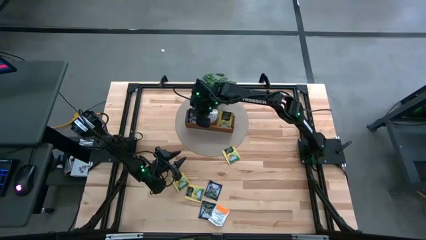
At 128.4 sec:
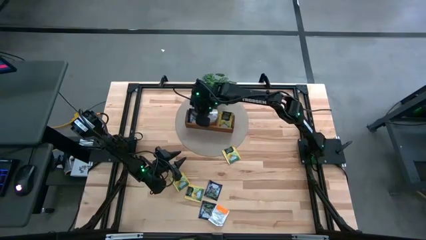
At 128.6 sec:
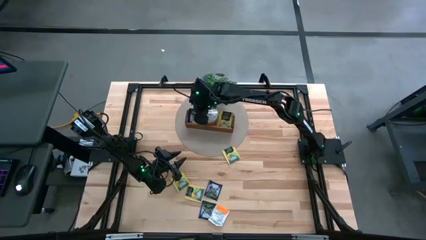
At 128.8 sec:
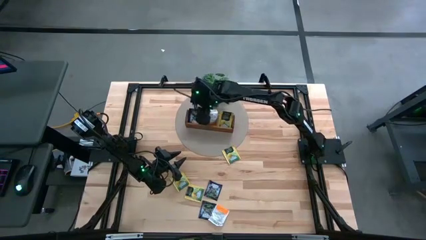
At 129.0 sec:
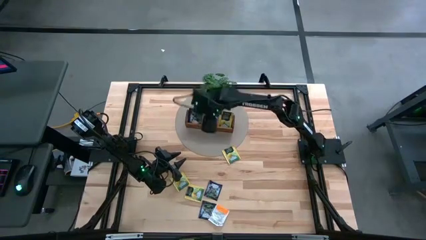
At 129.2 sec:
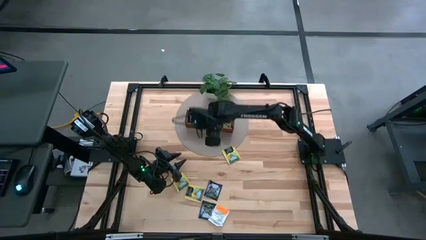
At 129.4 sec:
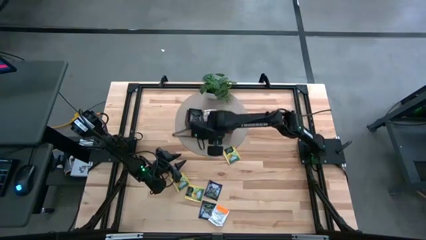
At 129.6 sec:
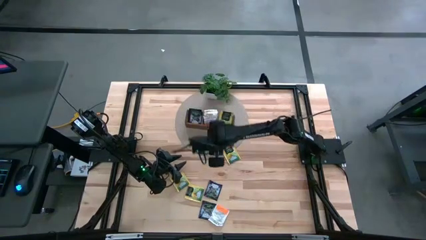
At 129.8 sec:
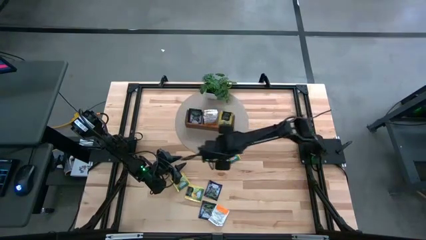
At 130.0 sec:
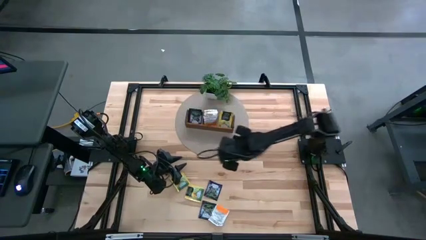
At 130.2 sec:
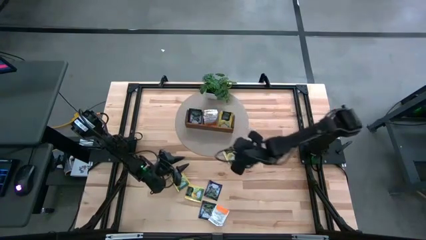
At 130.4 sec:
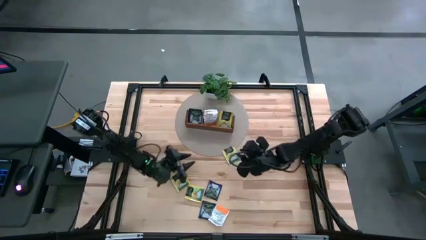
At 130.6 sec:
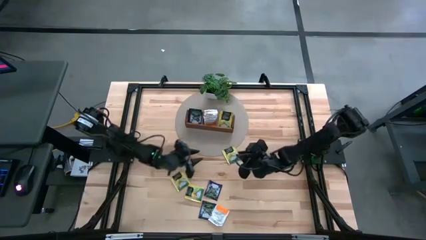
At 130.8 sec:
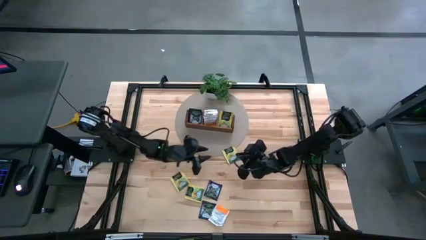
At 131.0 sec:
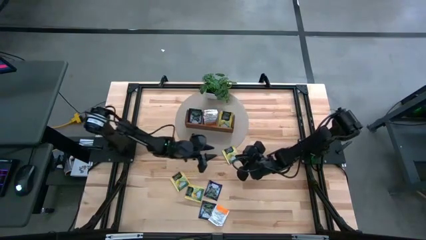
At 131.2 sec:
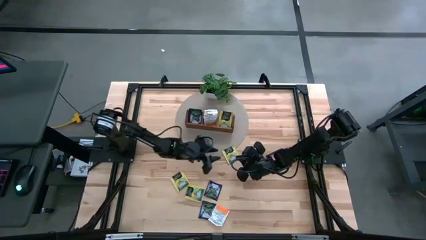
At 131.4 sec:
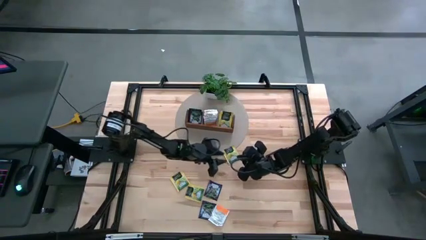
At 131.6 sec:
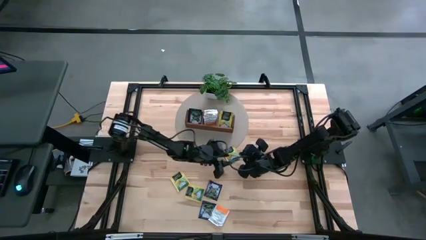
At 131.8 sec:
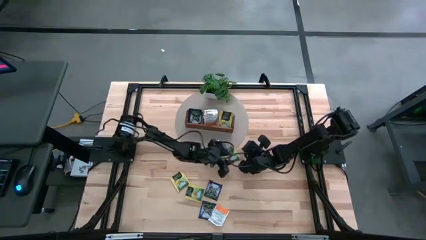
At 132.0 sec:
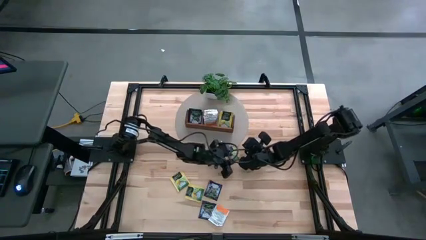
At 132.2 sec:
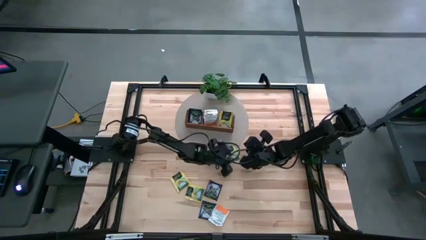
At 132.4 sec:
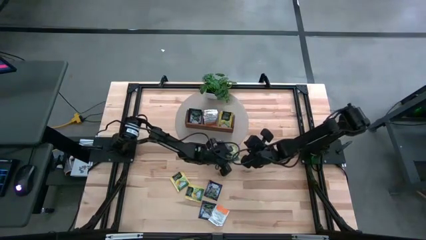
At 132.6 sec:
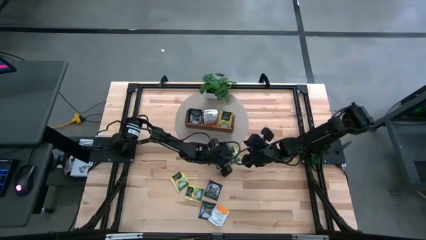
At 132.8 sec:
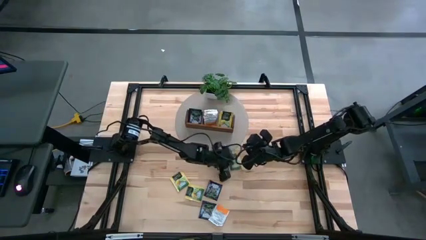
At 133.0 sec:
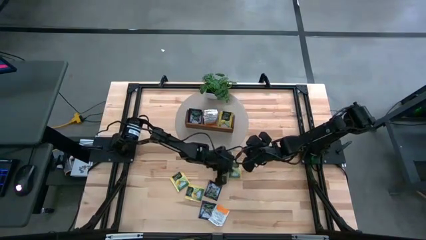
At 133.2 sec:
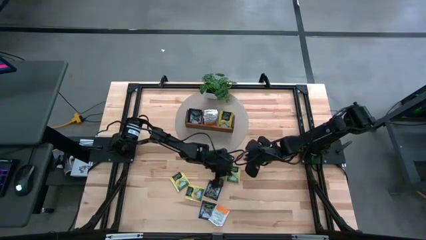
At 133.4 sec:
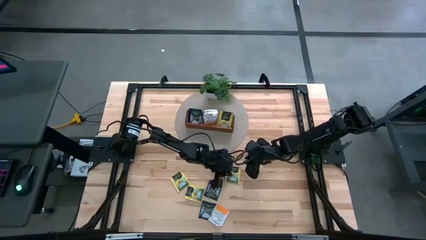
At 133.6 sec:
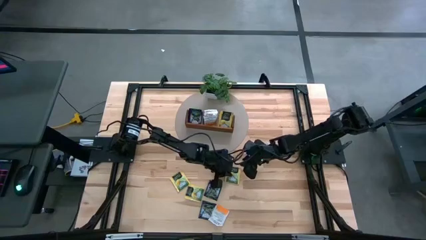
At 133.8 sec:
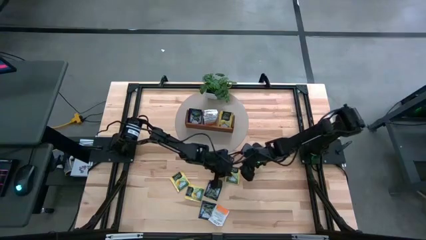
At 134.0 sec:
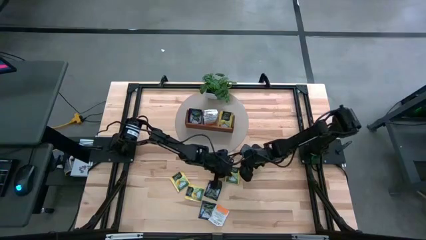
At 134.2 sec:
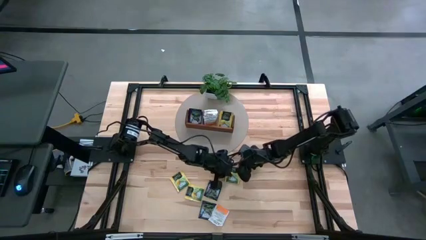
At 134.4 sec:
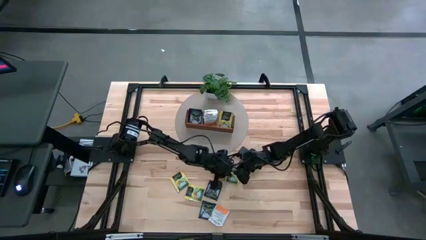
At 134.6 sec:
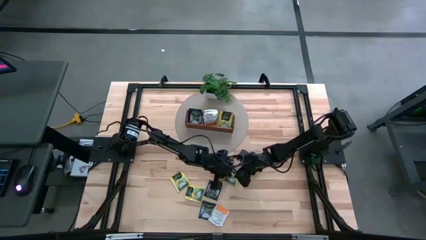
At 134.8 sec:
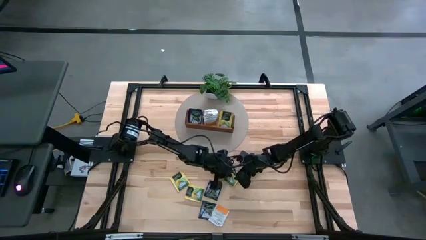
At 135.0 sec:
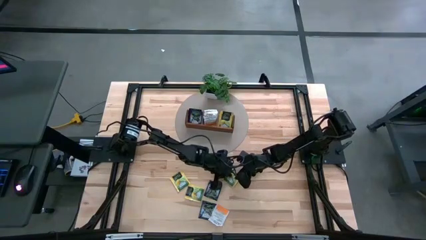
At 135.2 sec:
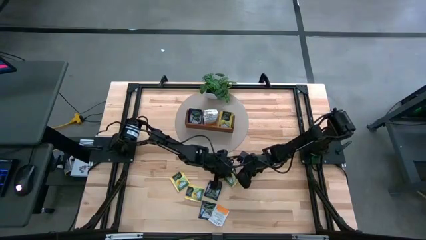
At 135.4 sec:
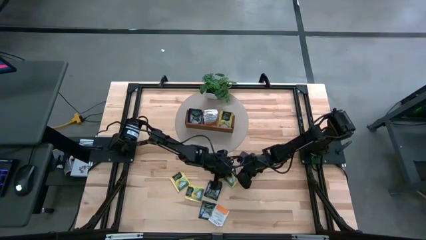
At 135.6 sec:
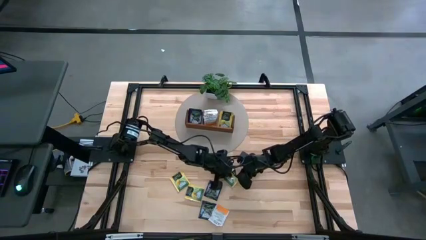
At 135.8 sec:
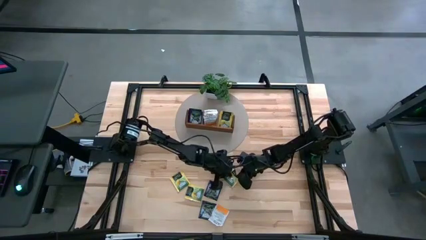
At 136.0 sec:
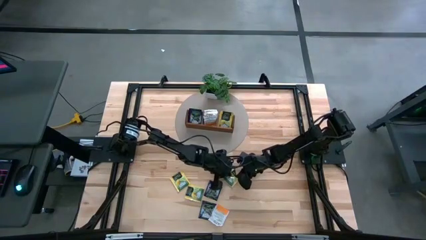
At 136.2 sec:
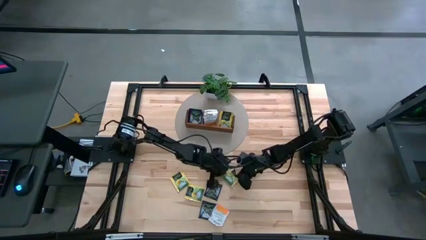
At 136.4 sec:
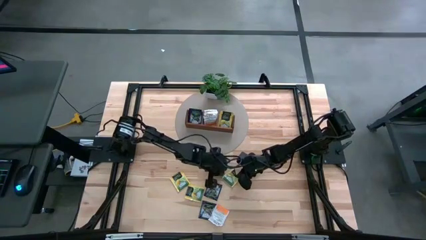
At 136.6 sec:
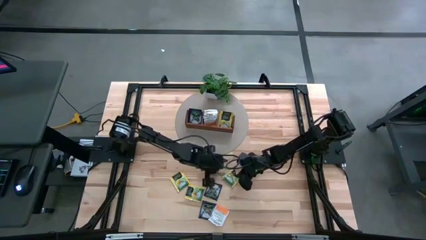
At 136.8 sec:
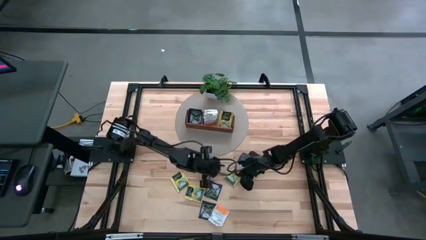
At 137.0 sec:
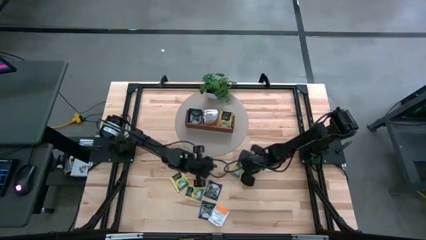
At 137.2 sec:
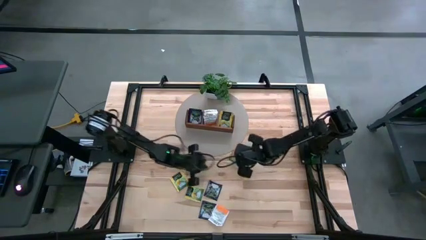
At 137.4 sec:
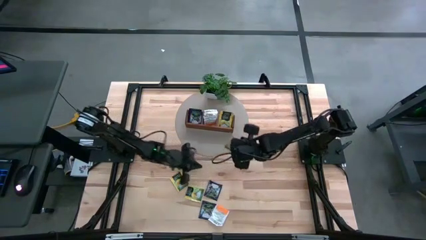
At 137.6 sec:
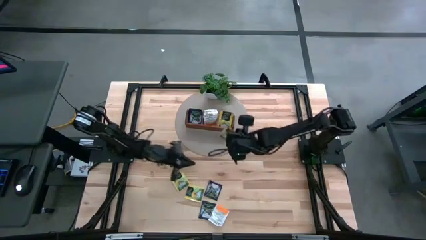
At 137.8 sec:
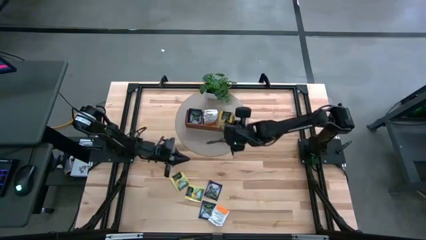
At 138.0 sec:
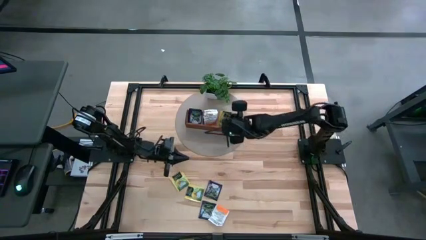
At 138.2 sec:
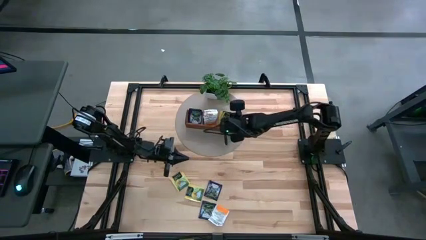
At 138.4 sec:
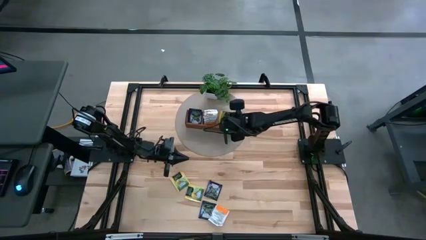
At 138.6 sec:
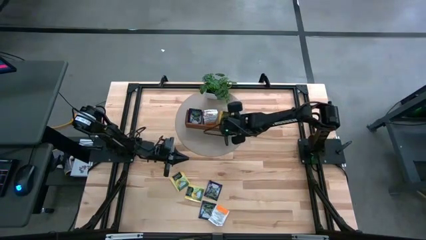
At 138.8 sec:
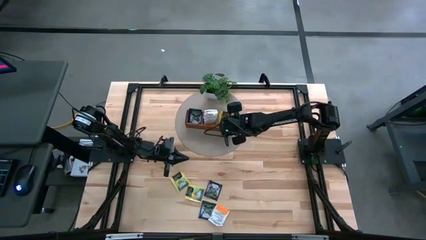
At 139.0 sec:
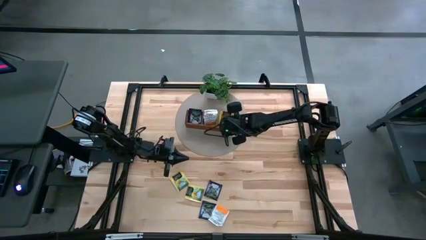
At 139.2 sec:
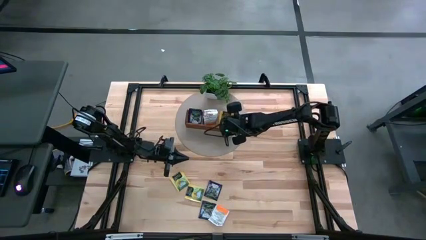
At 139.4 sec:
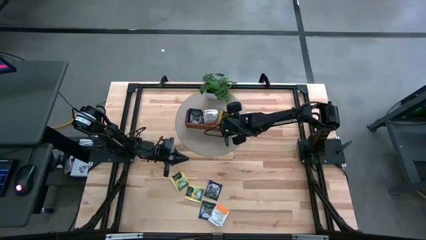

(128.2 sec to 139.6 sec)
Task: Pick & Place Tea
Put the right yellow tea bag into the right section of the wooden organizer

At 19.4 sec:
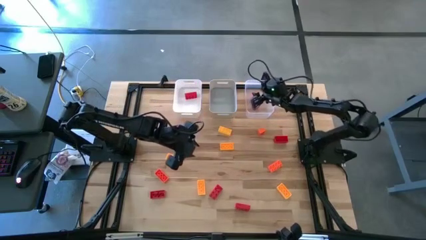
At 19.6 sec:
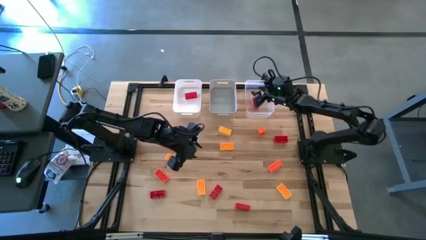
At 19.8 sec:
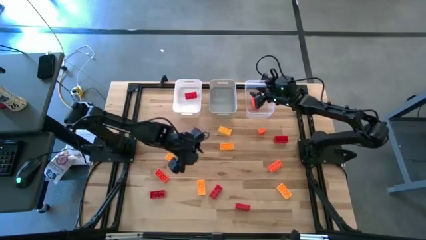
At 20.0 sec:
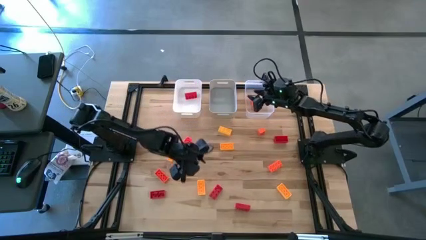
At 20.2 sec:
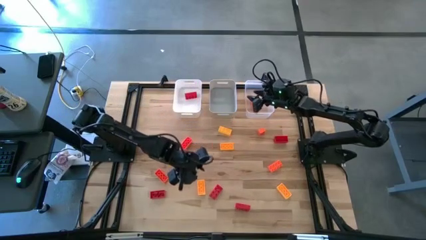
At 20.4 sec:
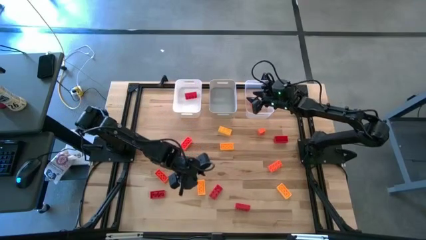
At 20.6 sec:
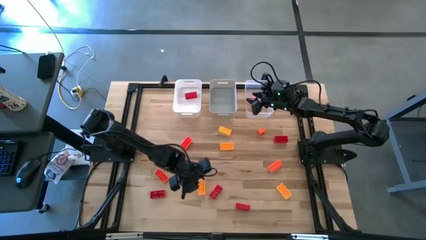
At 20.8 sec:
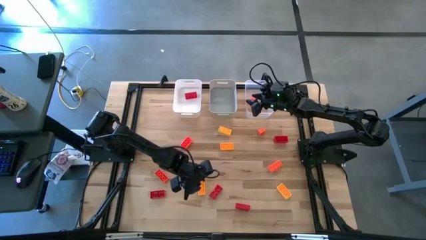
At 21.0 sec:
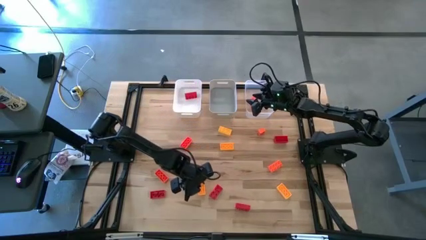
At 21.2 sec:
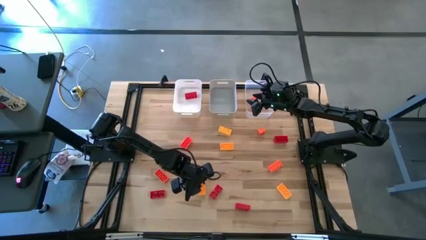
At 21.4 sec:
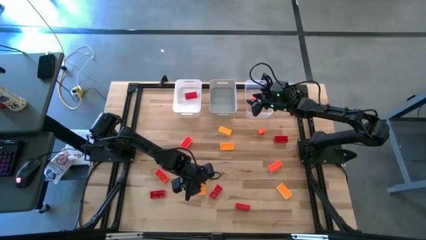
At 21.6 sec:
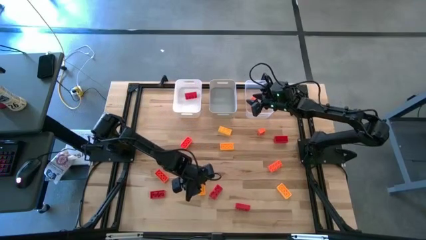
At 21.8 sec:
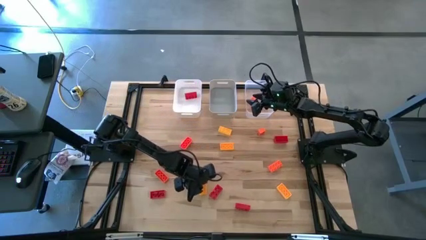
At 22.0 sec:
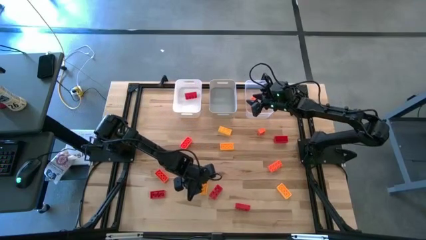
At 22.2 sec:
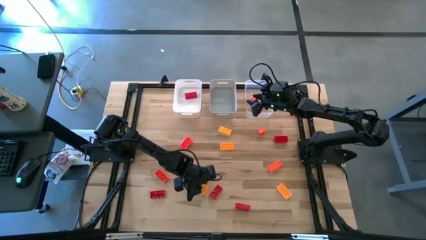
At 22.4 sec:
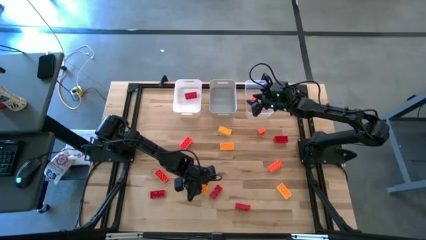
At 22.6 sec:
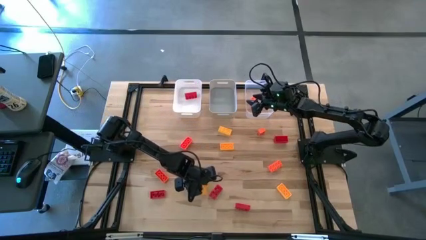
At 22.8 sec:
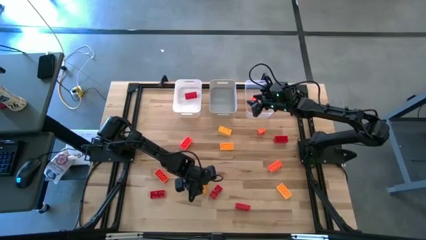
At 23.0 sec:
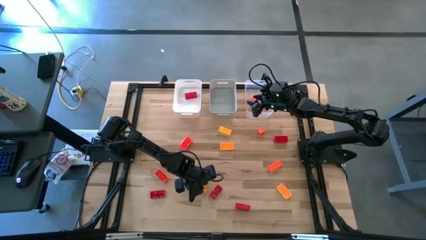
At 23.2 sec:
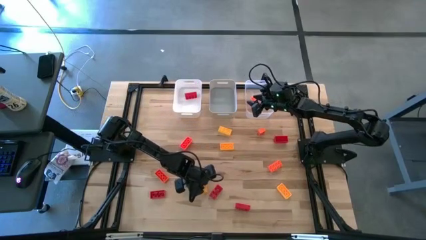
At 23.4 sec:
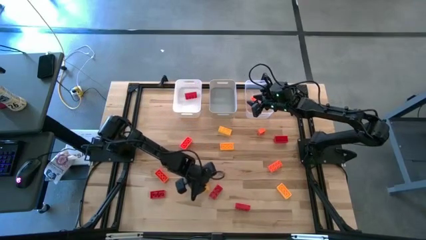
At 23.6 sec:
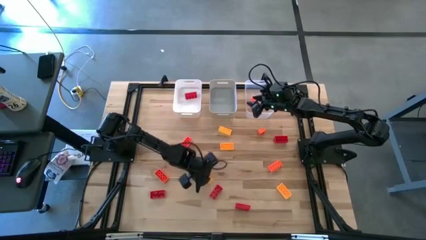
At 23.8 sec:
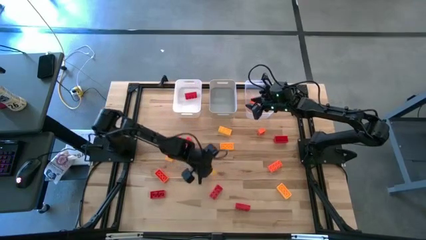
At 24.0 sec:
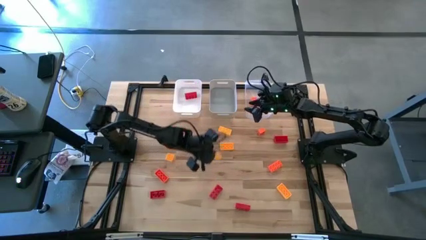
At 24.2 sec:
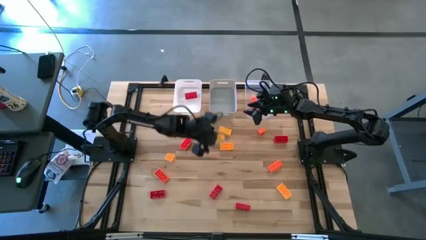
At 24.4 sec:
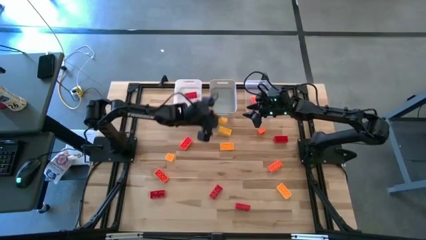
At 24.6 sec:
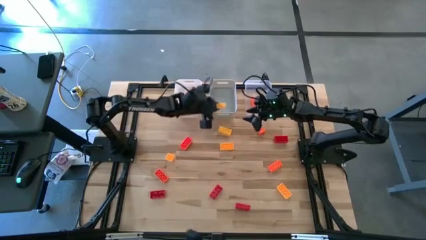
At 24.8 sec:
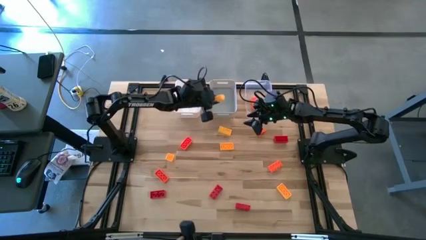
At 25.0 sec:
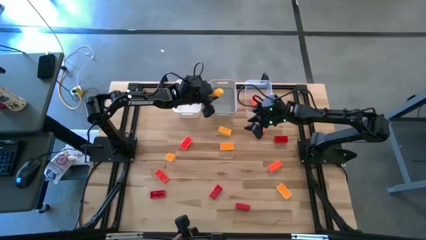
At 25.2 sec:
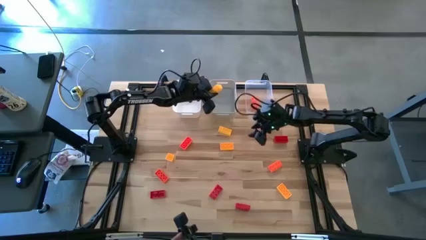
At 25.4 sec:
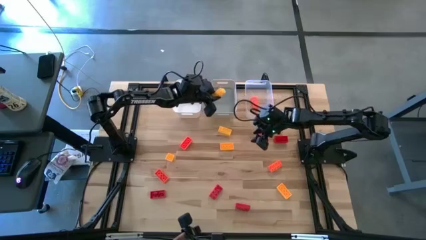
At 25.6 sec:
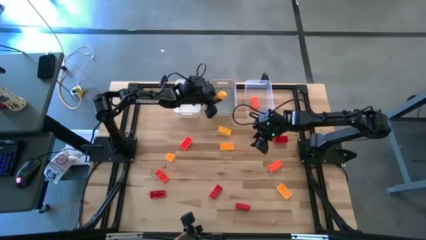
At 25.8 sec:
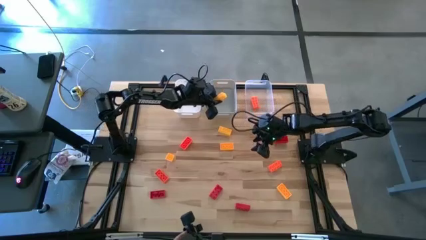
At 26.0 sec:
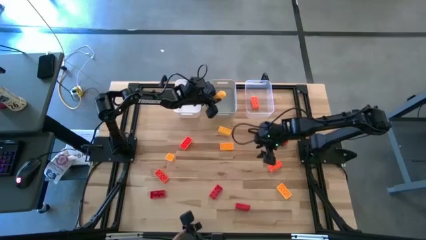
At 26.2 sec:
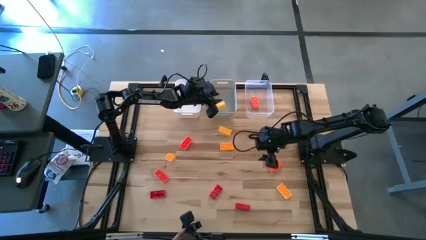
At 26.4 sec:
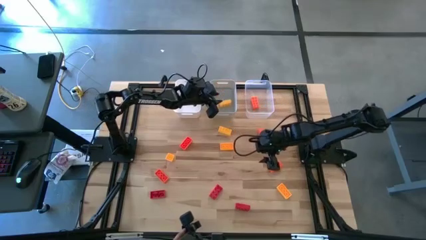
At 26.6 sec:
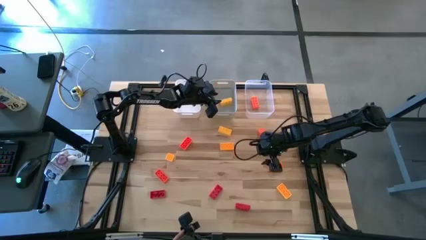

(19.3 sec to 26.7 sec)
Task: Sort & place blocks by color
Put the yellow game piece into the gray bin
